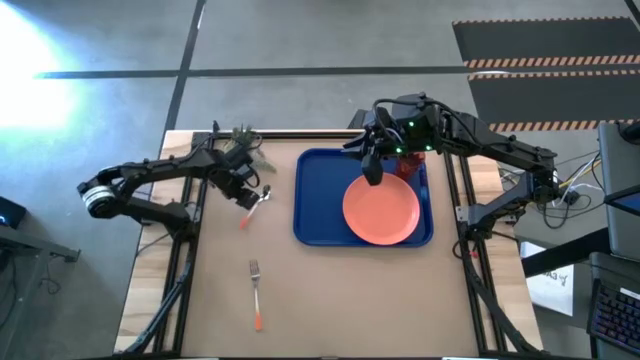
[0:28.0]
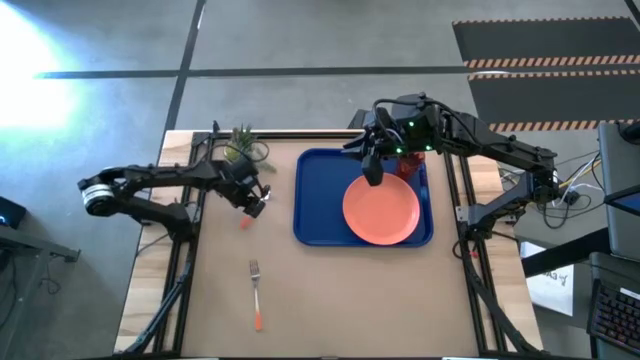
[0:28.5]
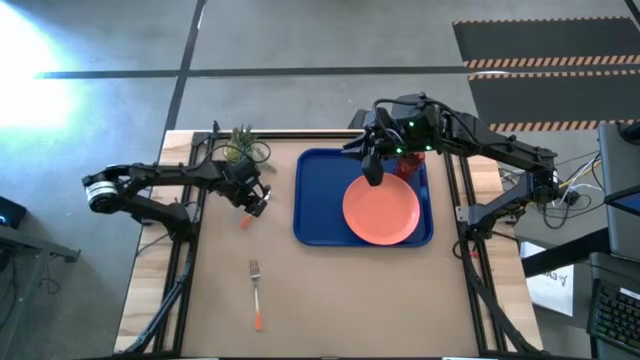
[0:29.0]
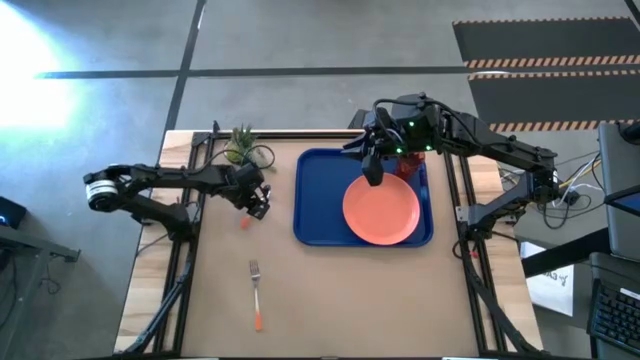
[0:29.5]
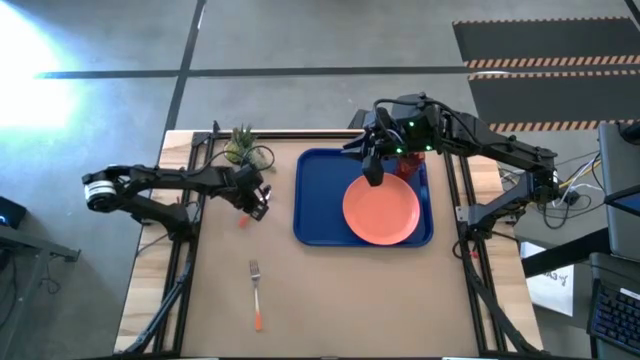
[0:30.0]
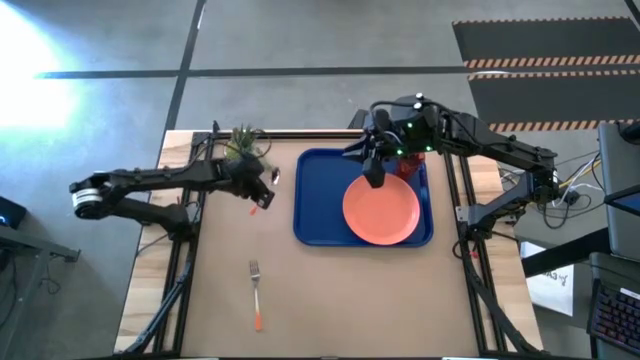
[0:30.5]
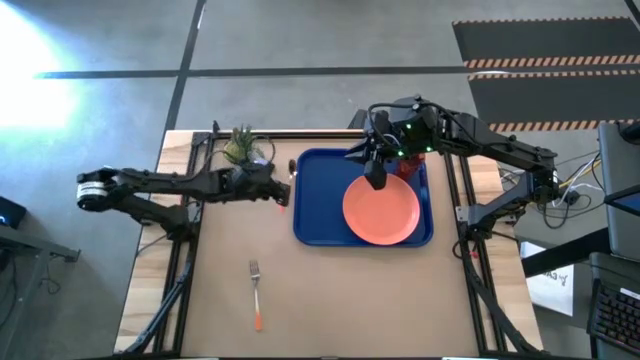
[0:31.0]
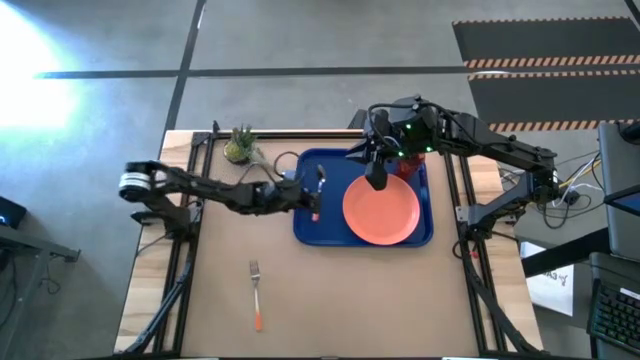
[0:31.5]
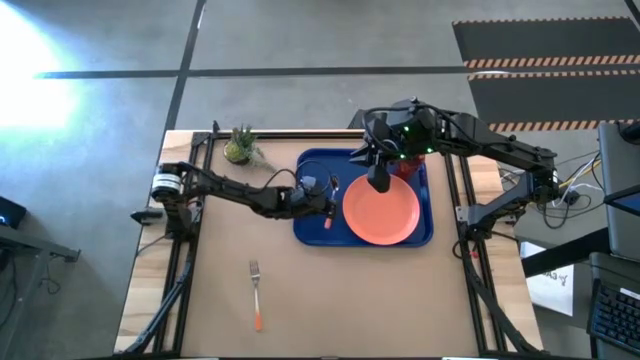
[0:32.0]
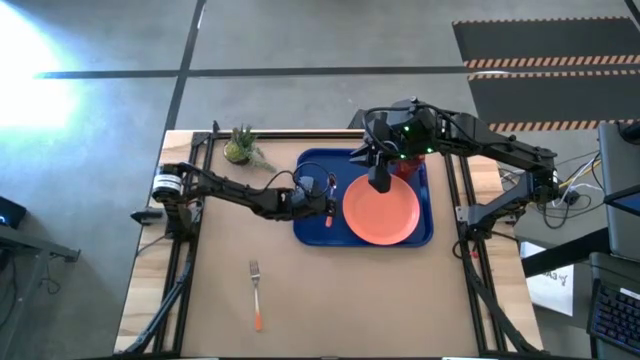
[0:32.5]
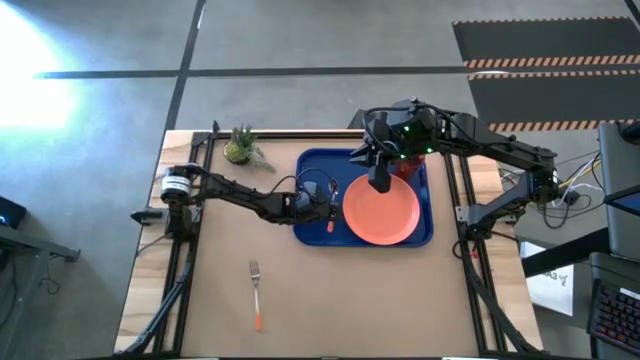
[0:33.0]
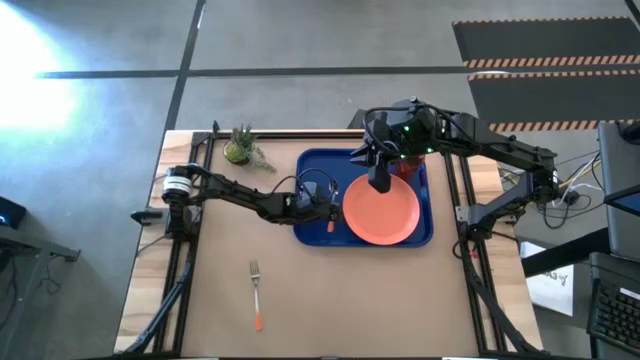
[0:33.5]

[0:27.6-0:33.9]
Task: Pick and place plate/cup/fork/spoon on tray
Put the orange spoon on the blue serving tray to the left of the orange plate

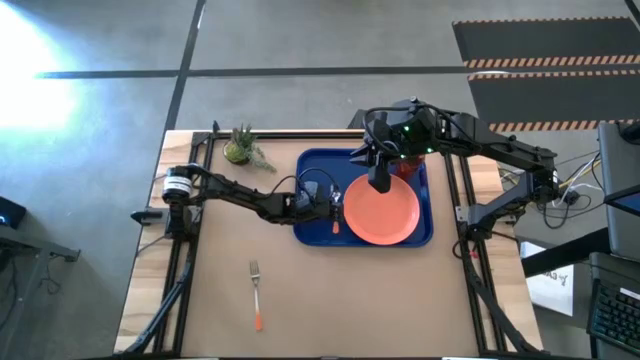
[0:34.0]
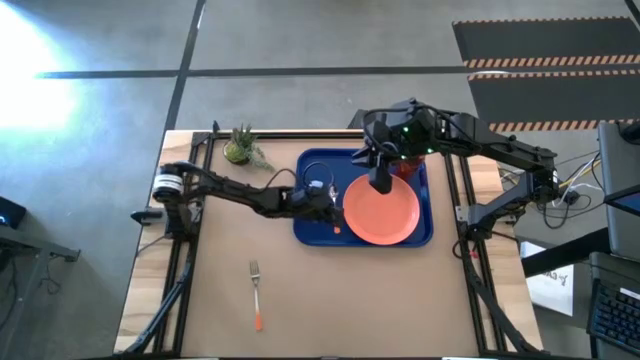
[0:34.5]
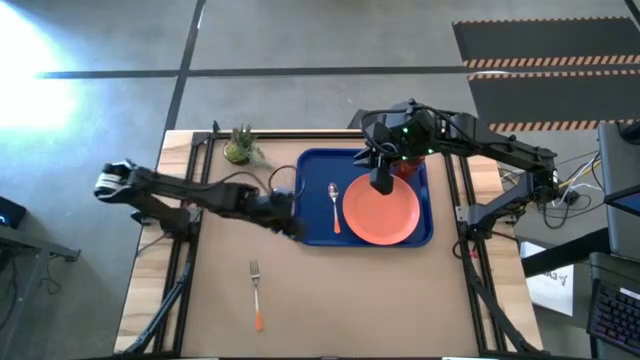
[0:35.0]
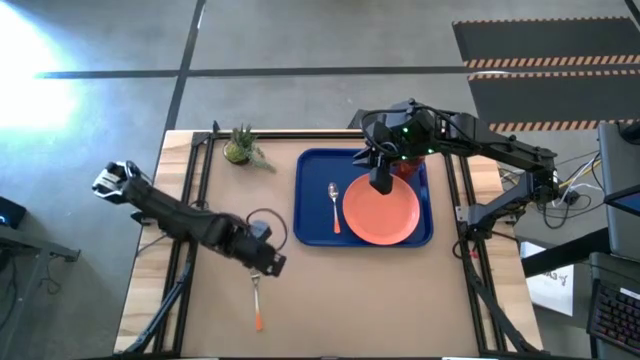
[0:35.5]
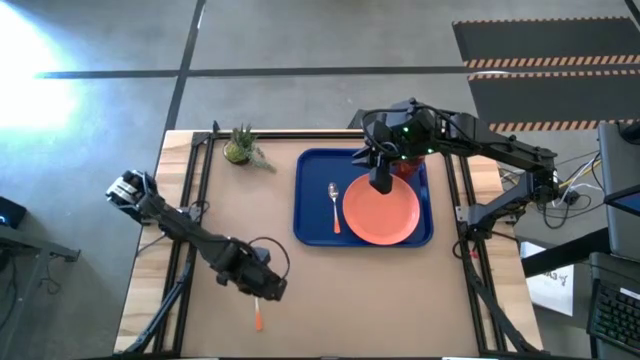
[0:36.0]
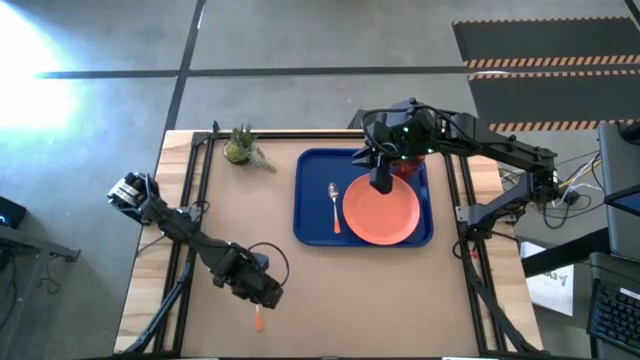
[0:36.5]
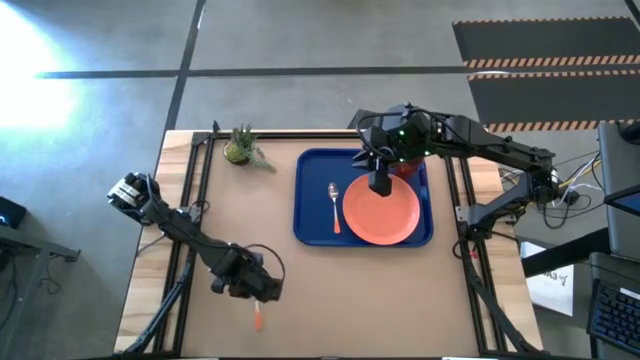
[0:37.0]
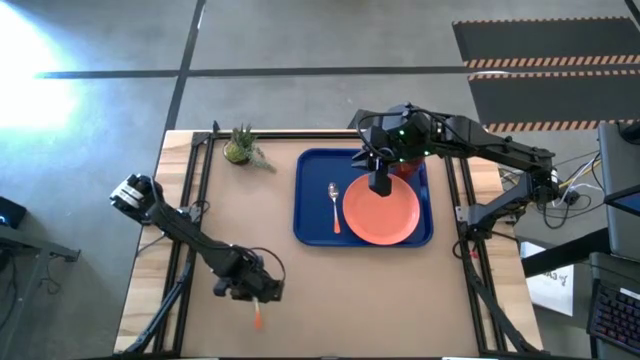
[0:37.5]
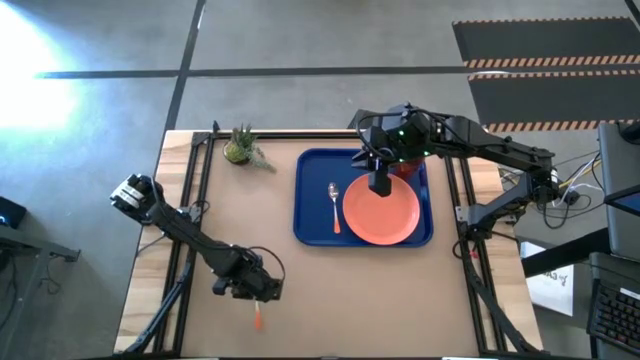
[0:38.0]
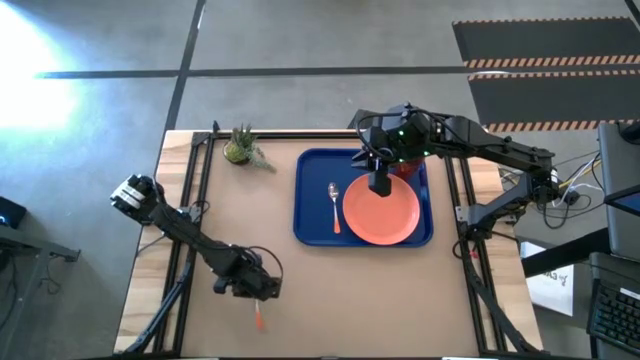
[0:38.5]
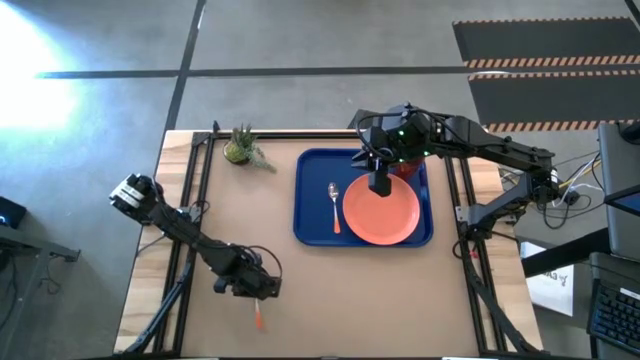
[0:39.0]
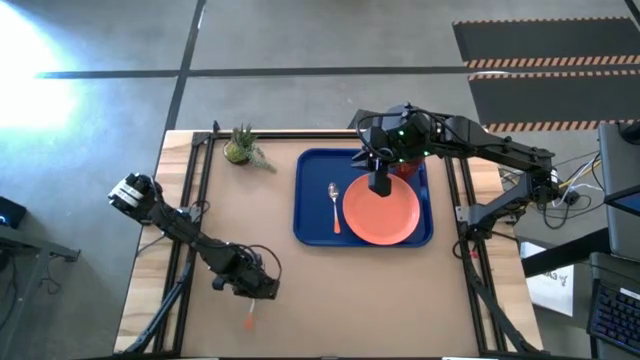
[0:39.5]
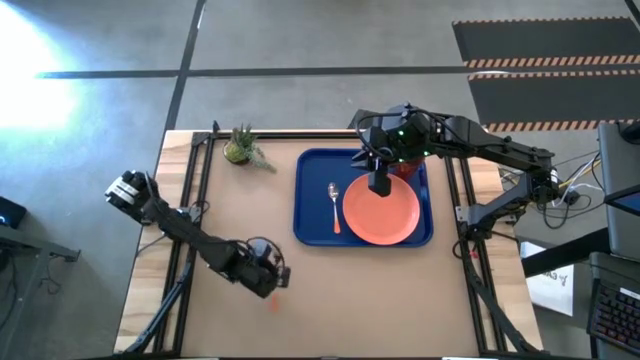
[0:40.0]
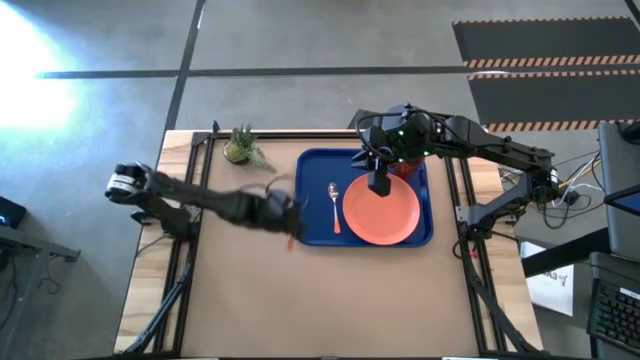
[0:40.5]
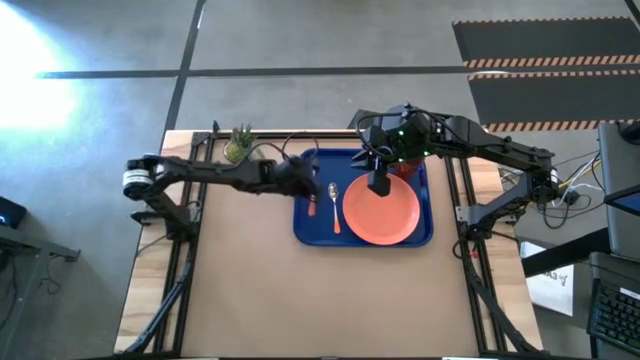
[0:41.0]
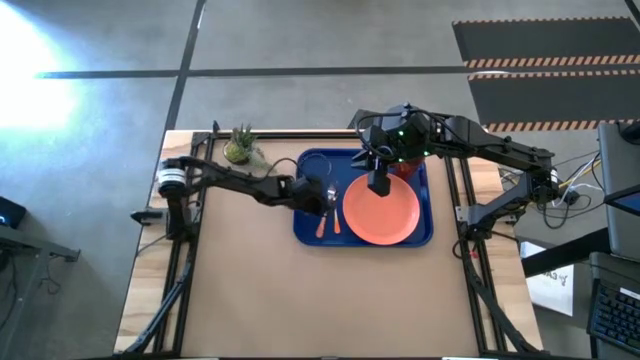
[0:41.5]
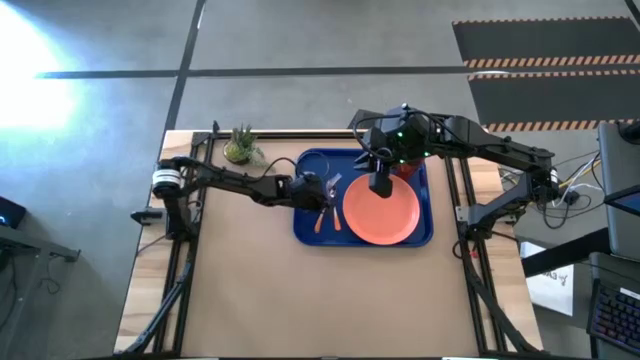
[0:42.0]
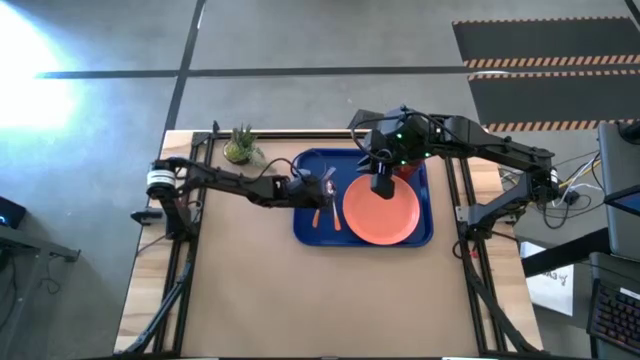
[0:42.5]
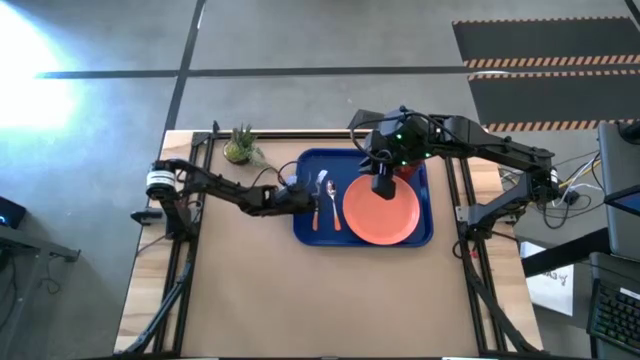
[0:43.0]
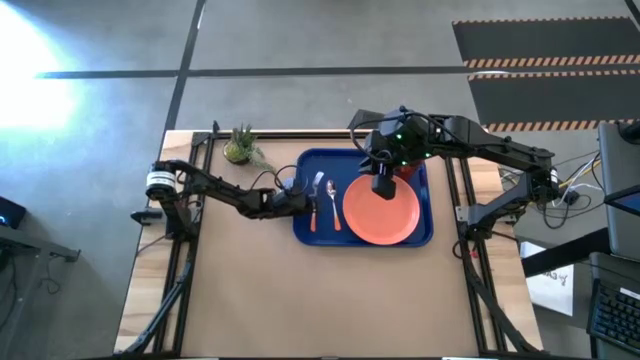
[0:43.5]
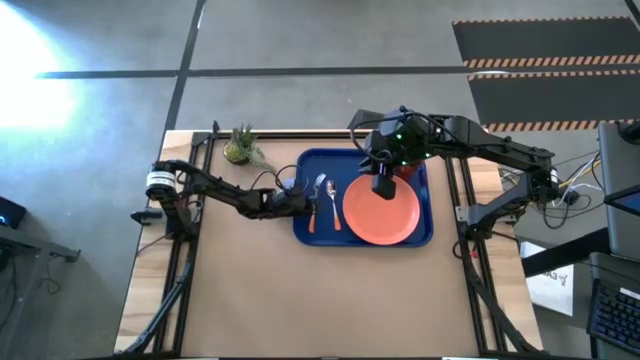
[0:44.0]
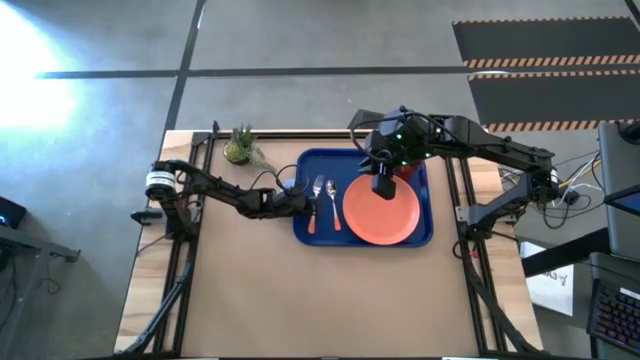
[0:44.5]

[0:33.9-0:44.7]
Put the orange fork on the blue serving tray to the left of the orange spoon

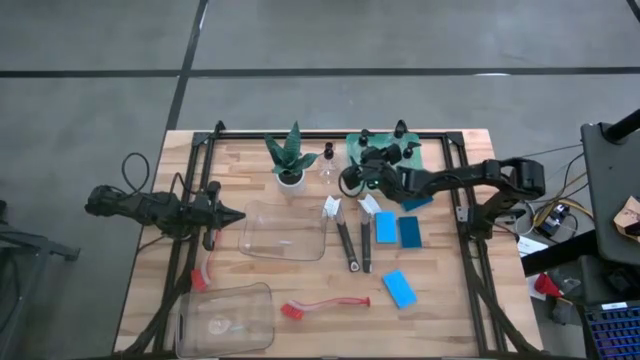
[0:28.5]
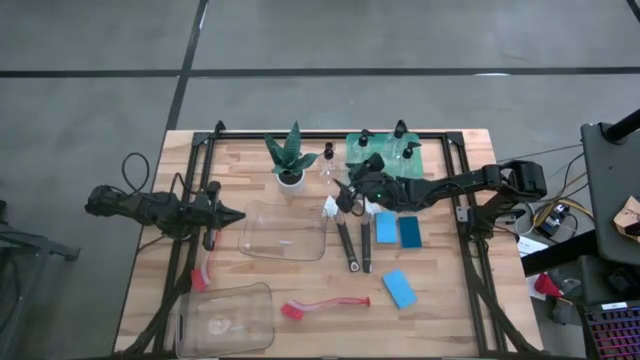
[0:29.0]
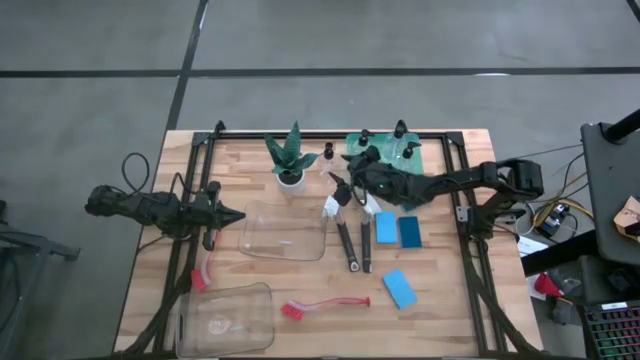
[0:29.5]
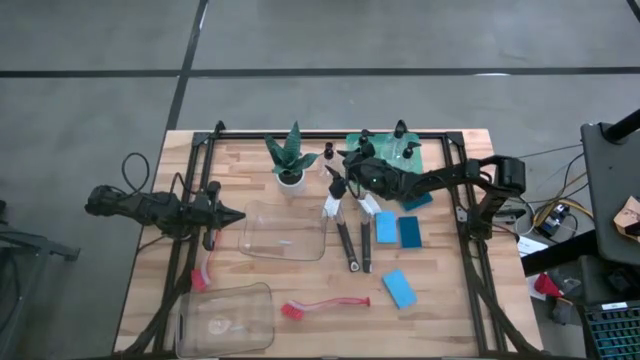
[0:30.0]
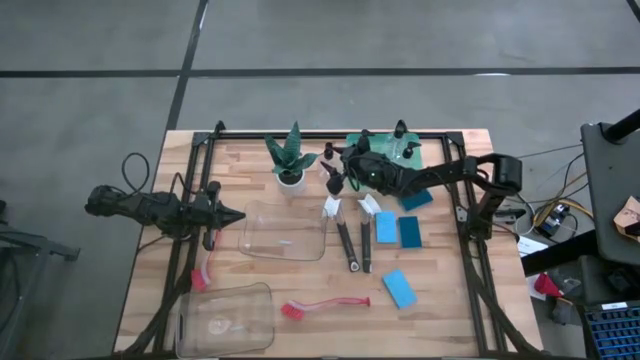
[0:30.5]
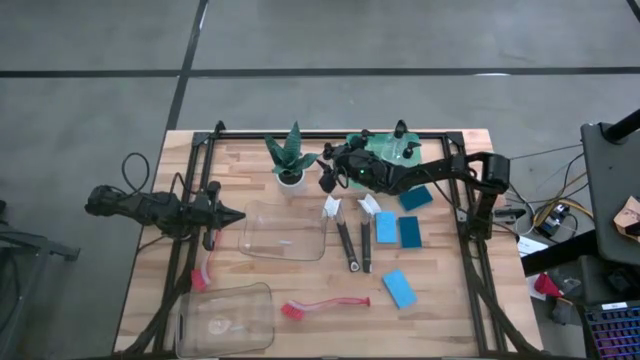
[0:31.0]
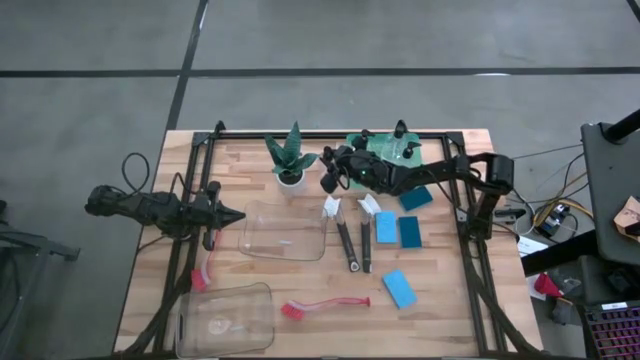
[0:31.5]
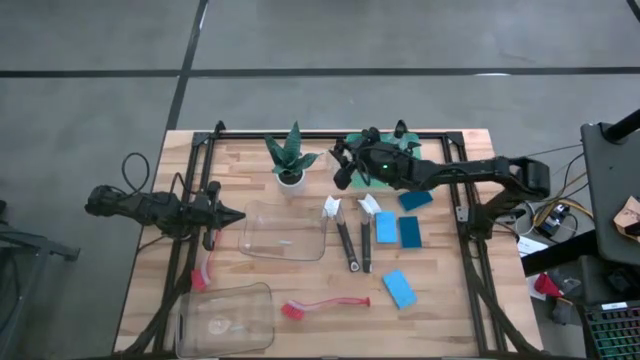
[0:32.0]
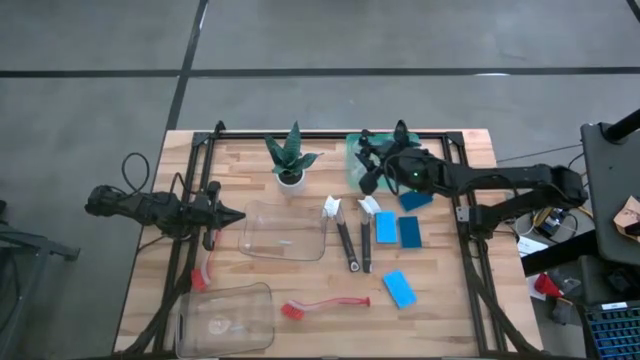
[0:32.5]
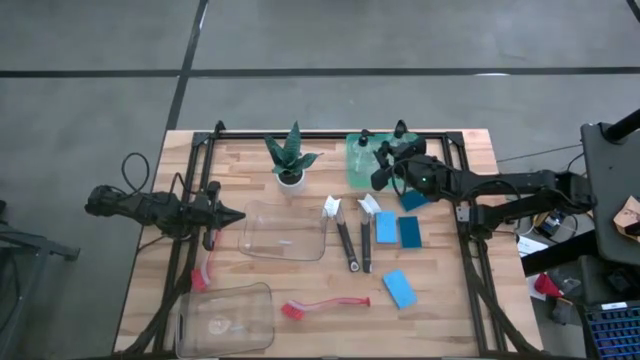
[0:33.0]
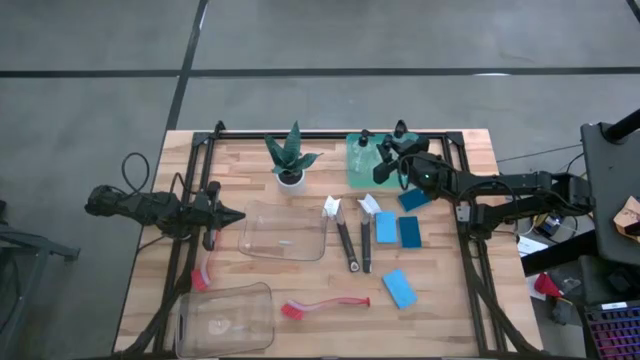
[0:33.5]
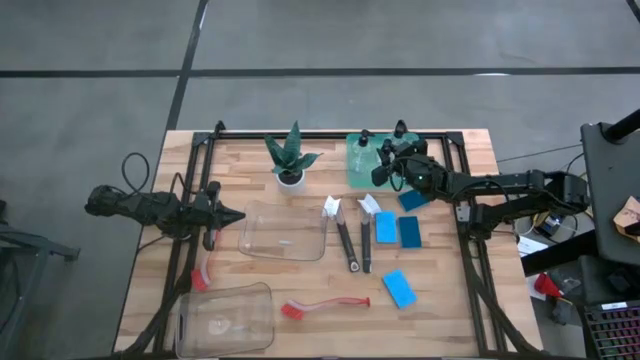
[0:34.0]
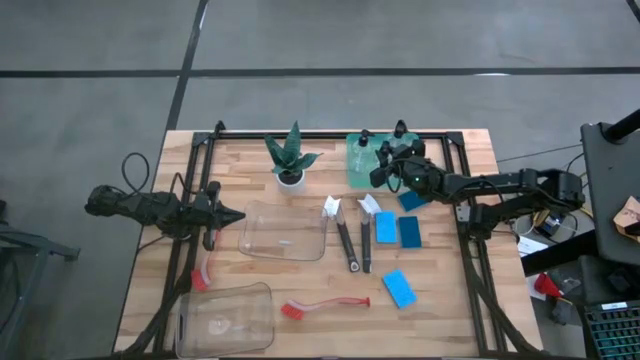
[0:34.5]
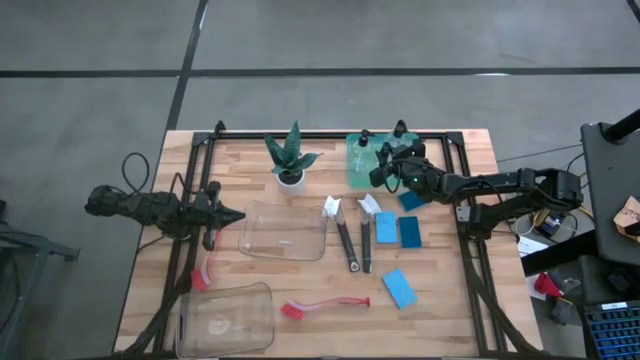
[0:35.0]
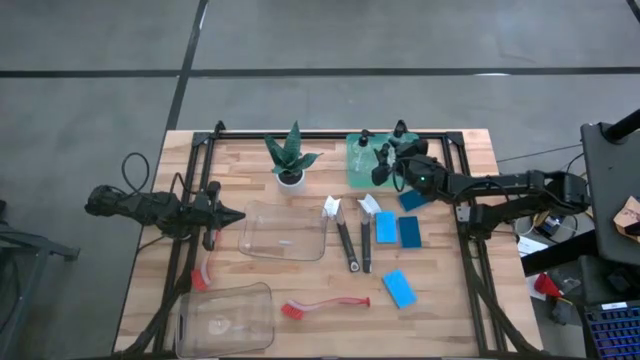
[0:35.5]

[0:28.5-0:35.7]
Task: Pick & Place Kitchen Sink Supplies
Put the transparent soap dispenser into the blue bin
